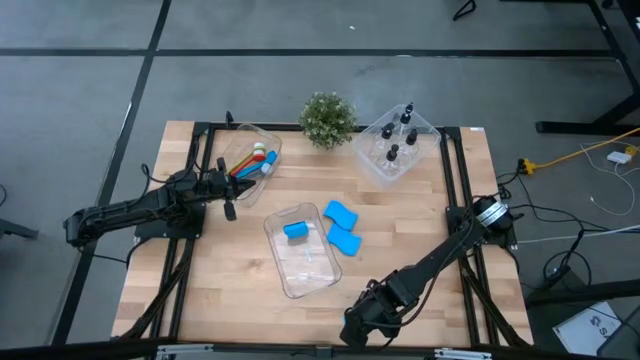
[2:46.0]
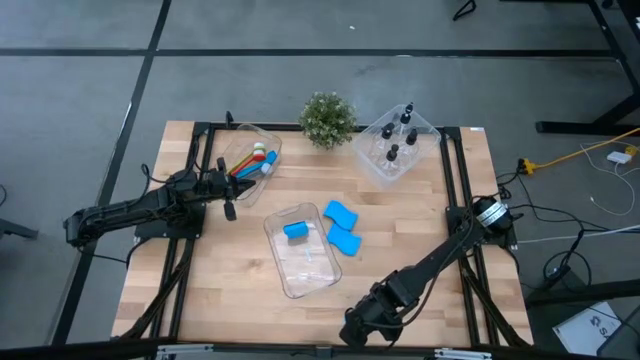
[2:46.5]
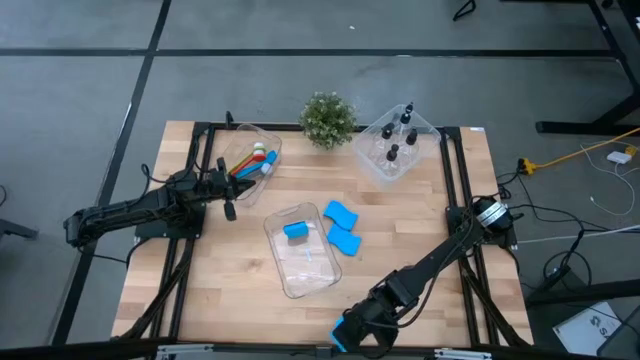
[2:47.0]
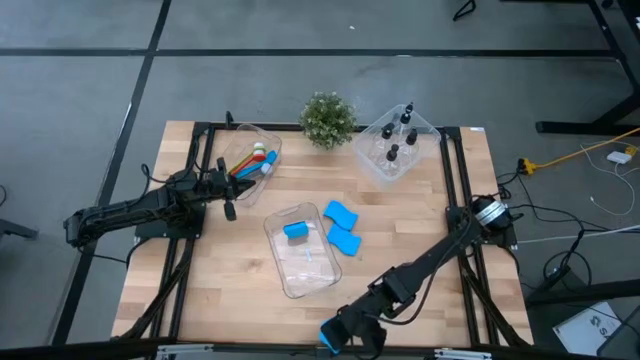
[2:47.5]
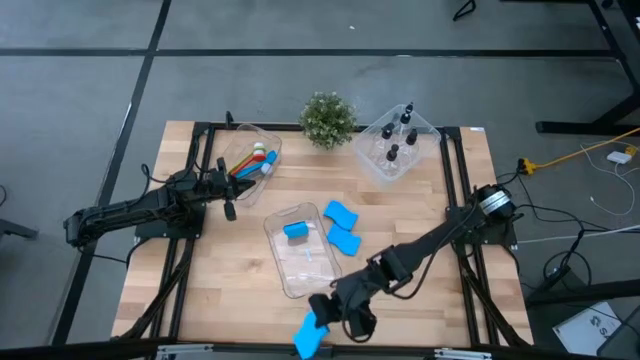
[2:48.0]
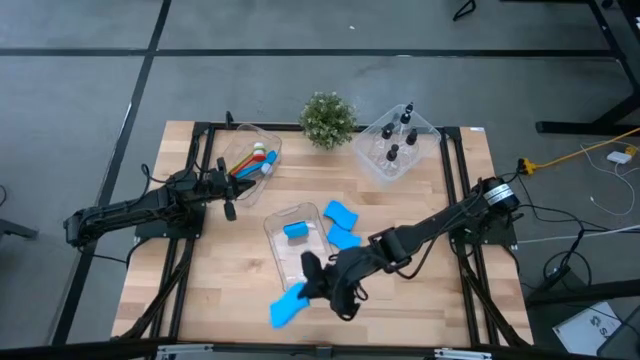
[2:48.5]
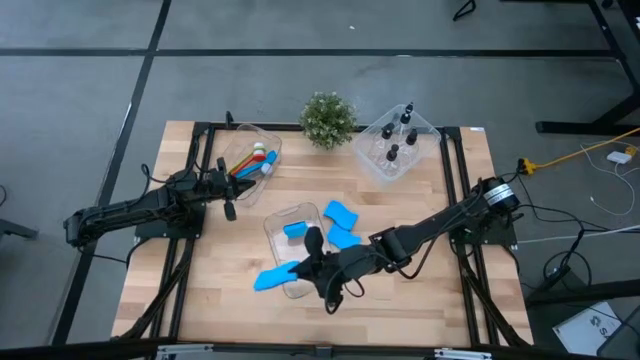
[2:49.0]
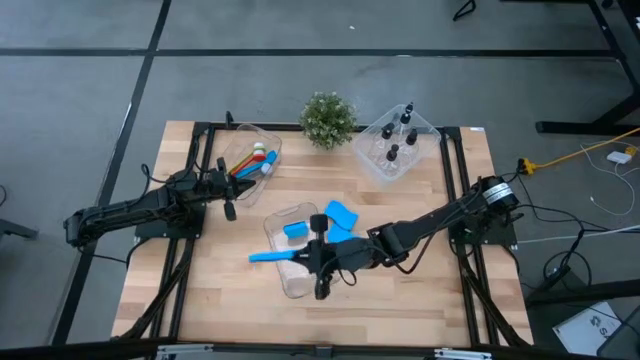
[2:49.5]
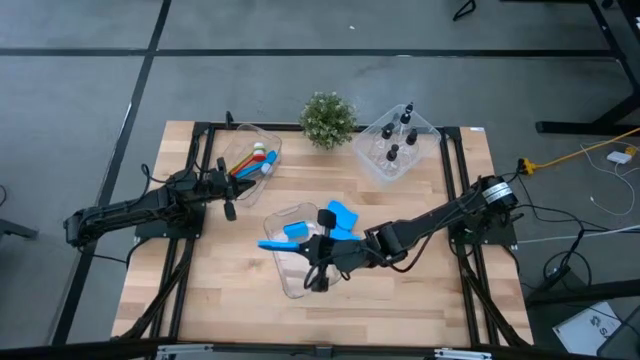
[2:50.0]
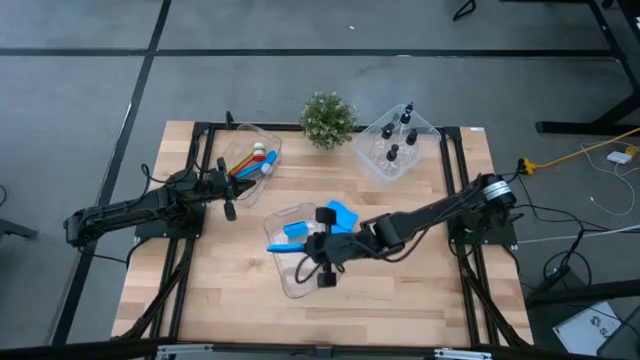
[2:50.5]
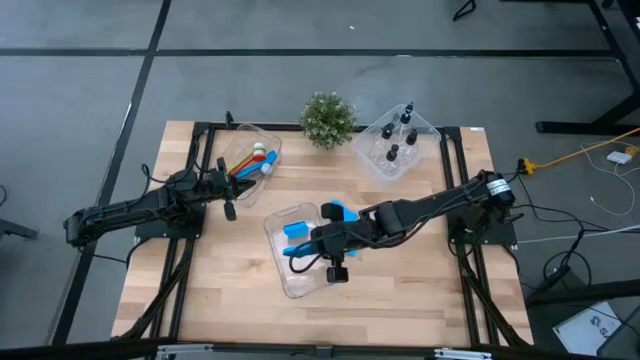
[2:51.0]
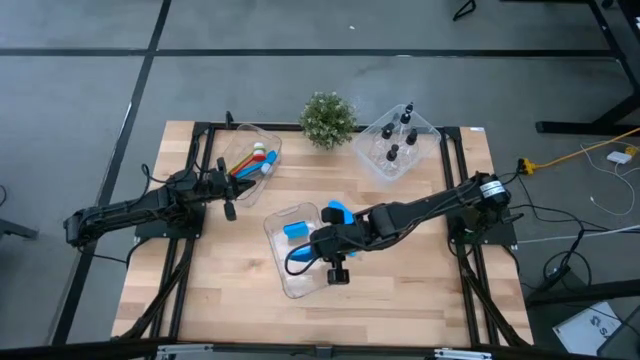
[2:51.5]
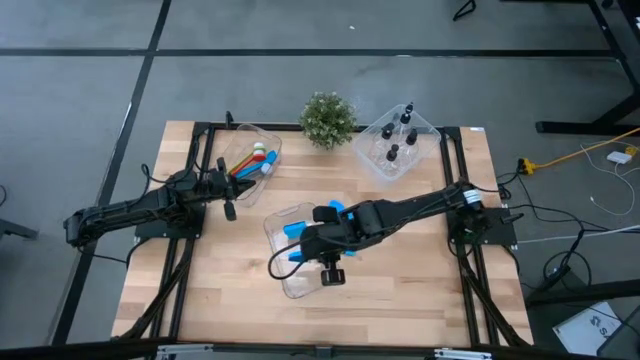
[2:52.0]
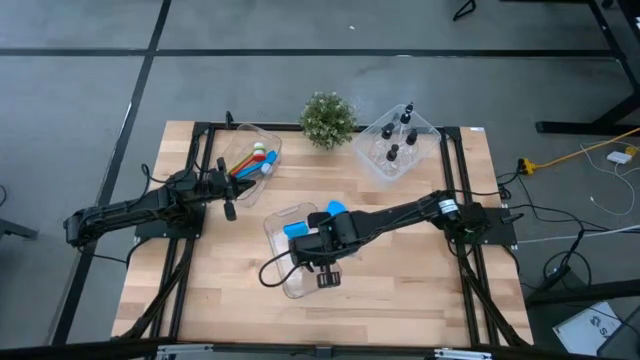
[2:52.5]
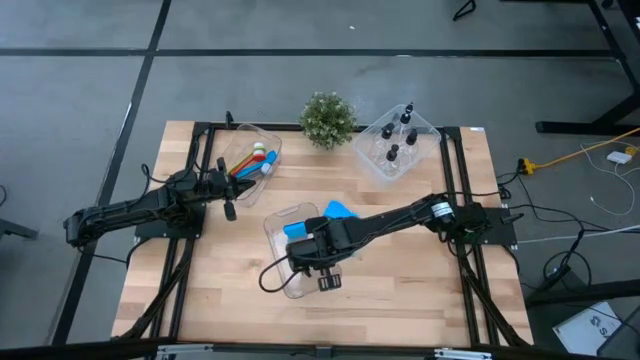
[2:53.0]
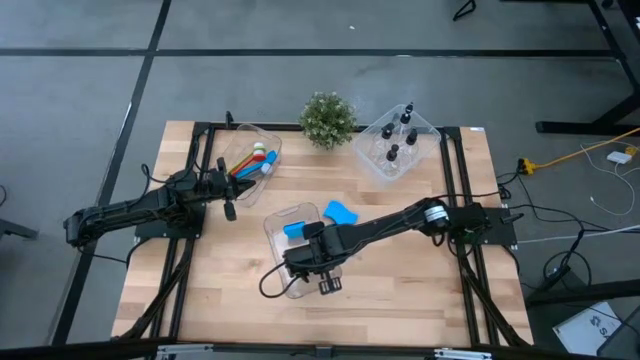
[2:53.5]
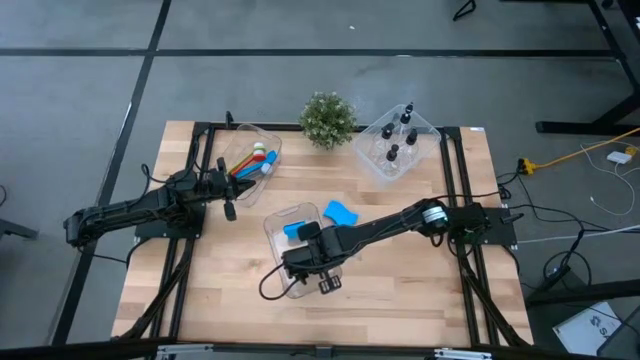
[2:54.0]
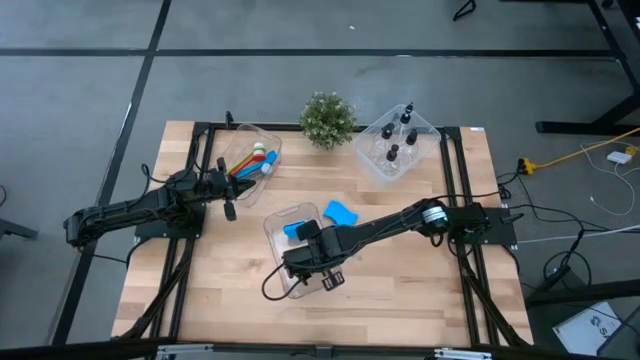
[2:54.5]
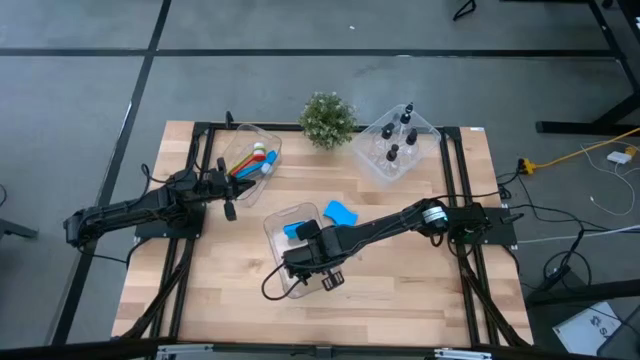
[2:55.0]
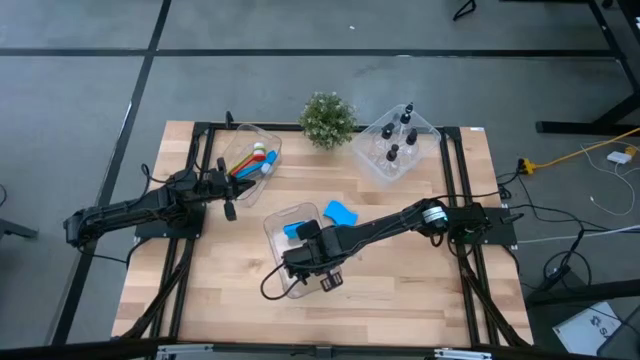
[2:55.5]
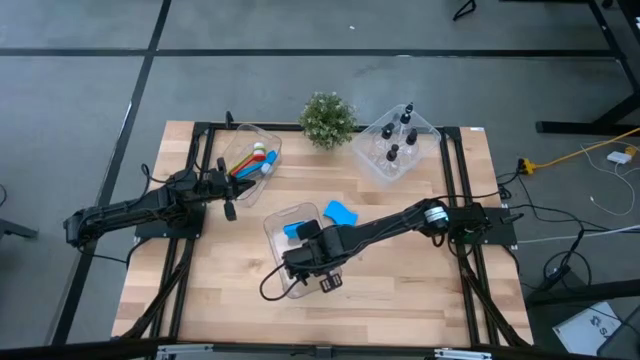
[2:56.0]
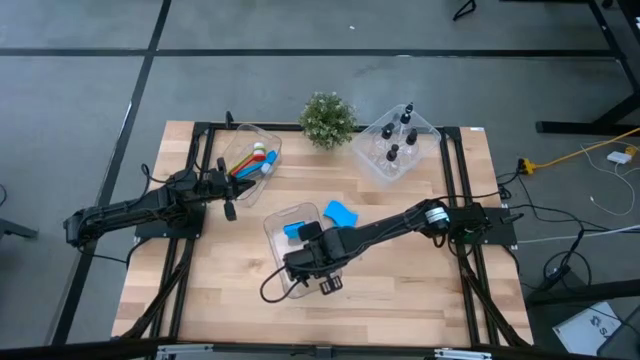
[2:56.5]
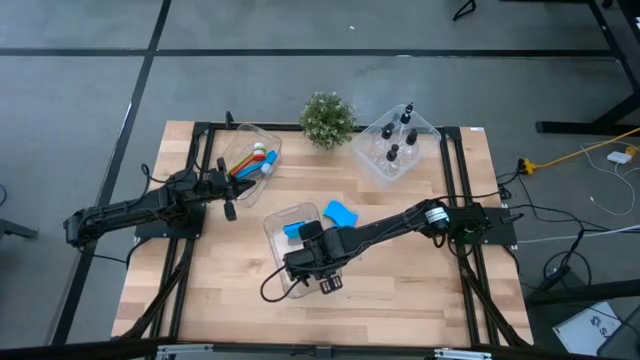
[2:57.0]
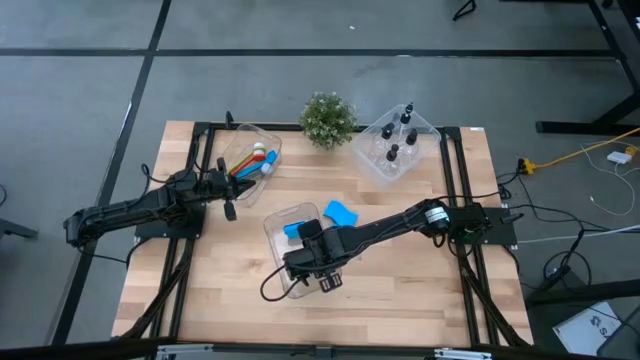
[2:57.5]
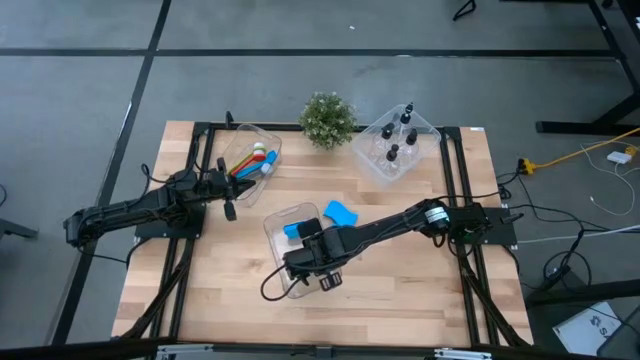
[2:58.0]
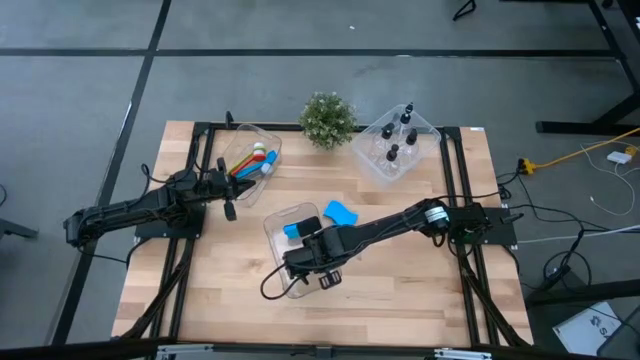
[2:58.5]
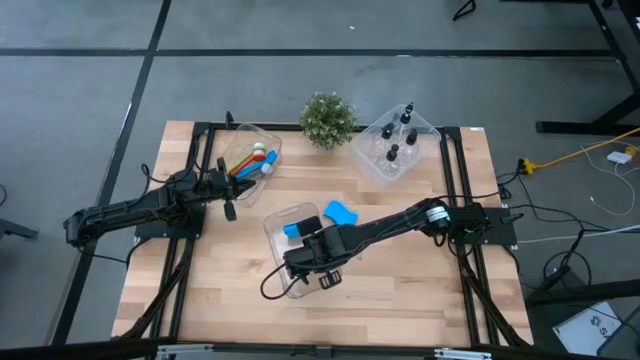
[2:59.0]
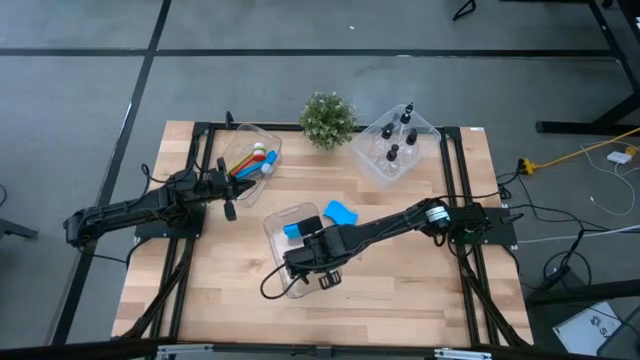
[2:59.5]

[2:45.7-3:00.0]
Task: Pick & Place Kitchen Sink Supplies
Put the sponge into the bottom transparent bin

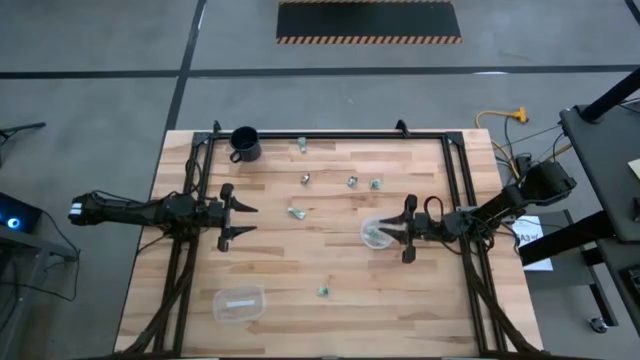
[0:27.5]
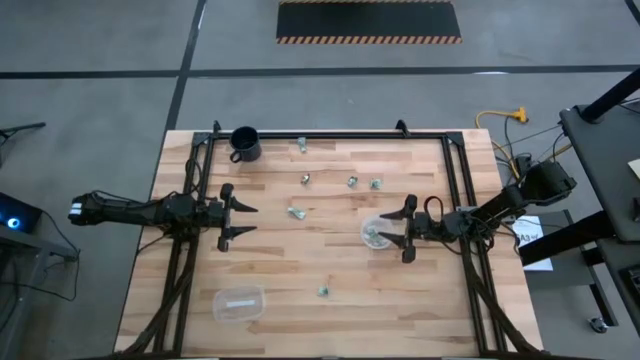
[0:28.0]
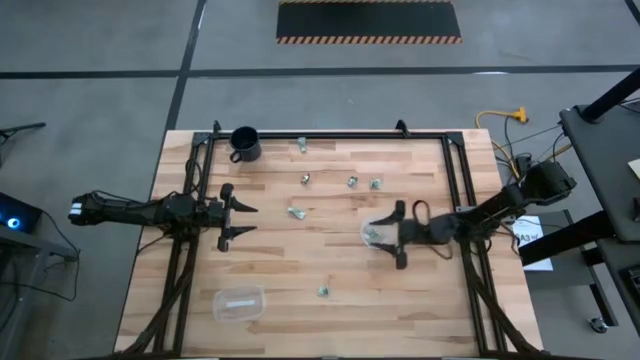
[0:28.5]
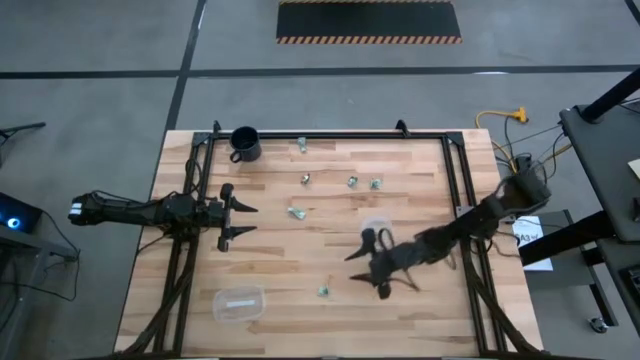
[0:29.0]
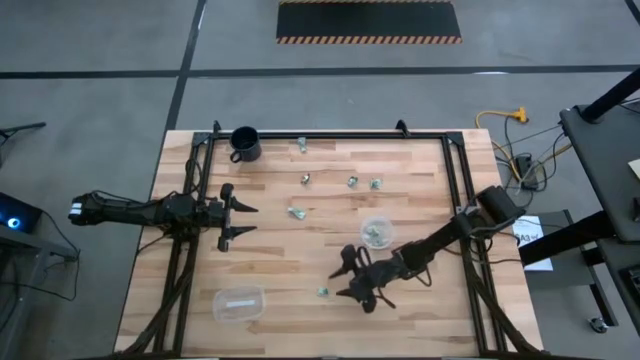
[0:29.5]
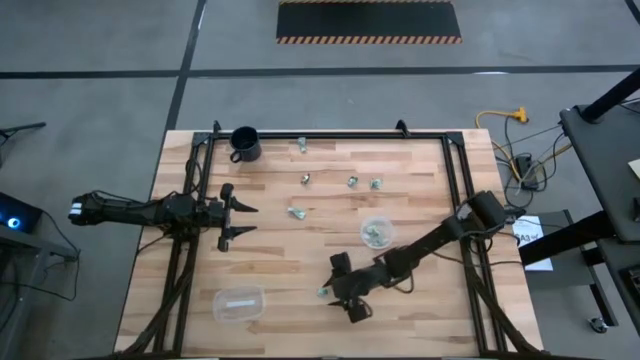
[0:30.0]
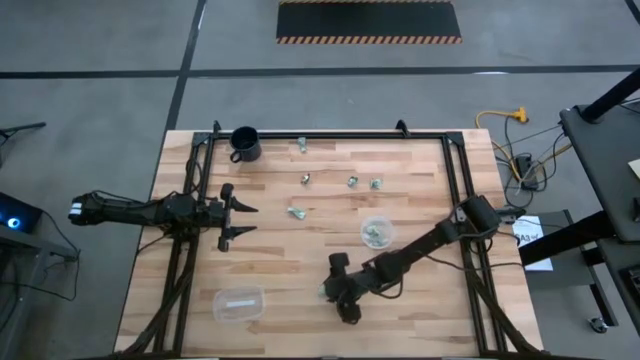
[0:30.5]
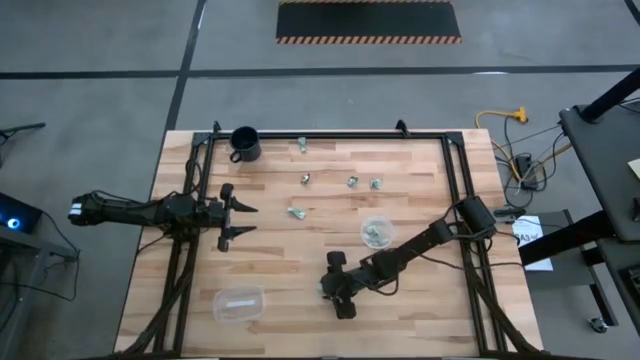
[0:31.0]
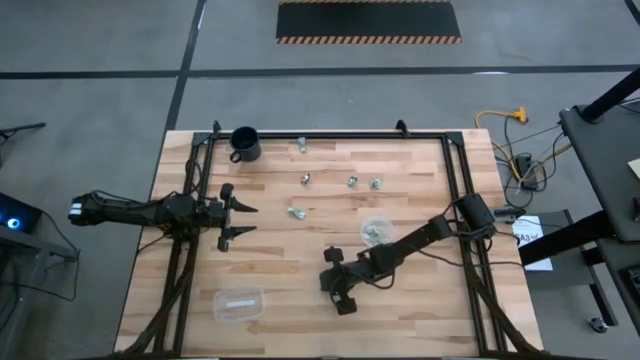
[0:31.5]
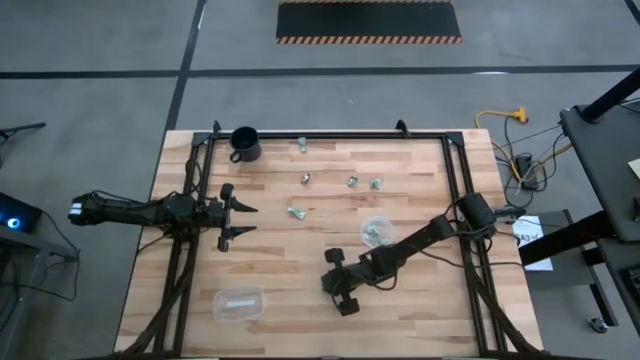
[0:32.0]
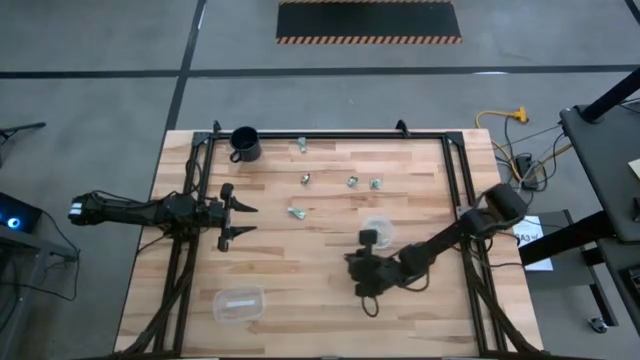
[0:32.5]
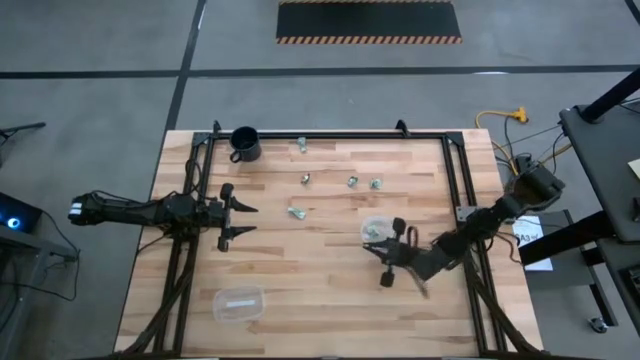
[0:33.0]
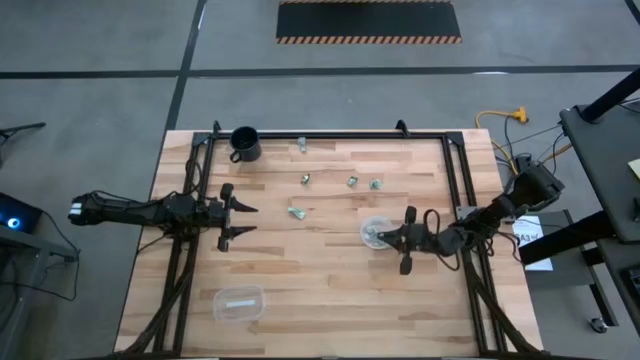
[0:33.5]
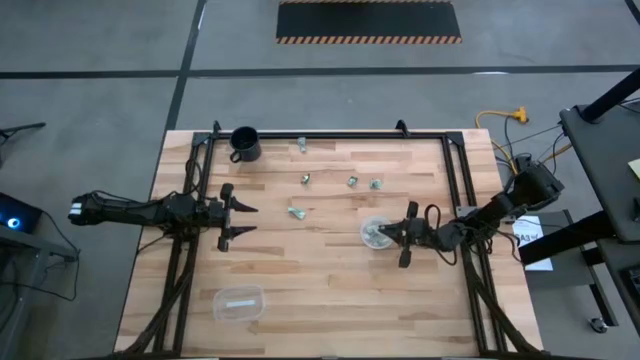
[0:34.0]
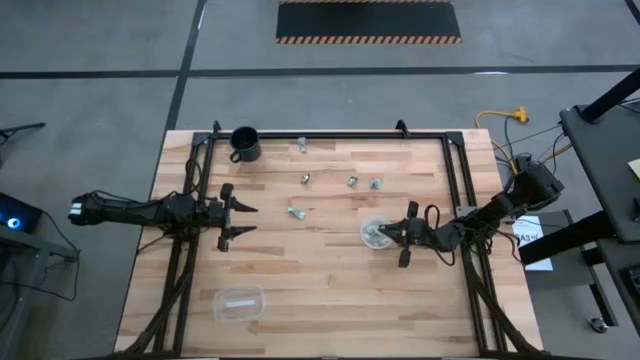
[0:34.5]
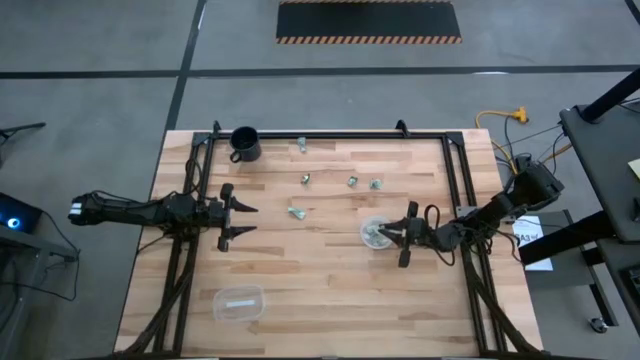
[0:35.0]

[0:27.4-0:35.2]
Task: Pick and place Stevia / Truvia into bins
Put the white stevia packet into the right transparent container
